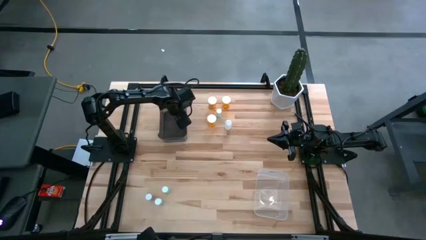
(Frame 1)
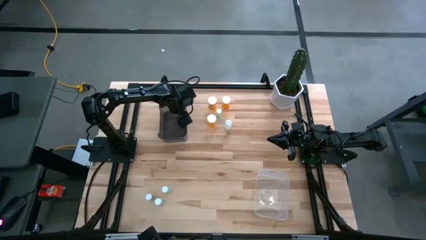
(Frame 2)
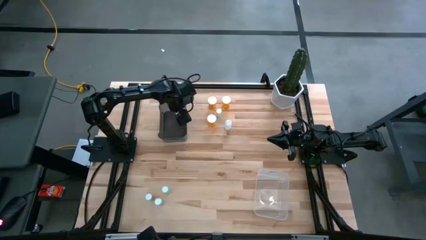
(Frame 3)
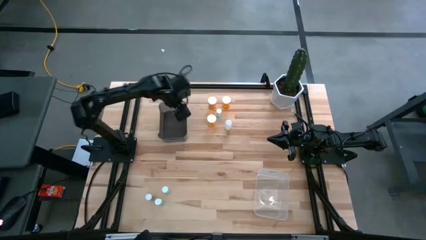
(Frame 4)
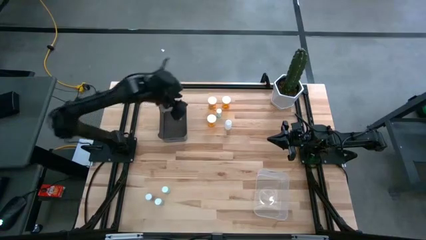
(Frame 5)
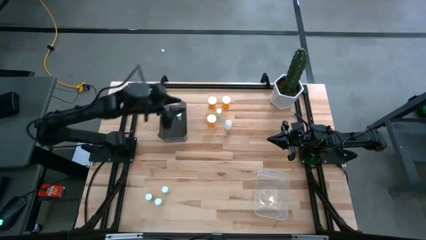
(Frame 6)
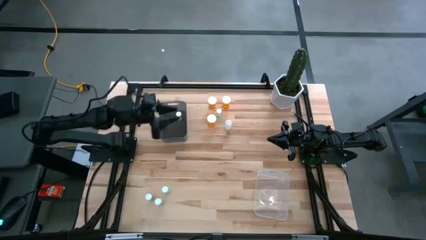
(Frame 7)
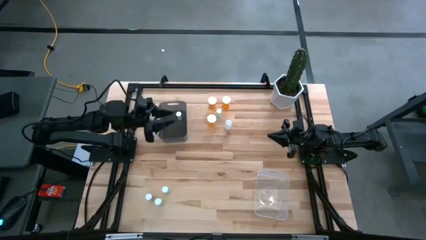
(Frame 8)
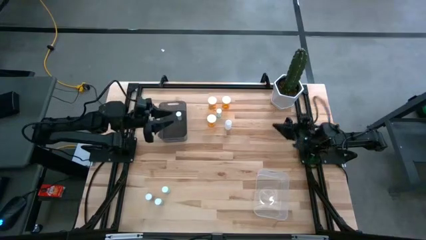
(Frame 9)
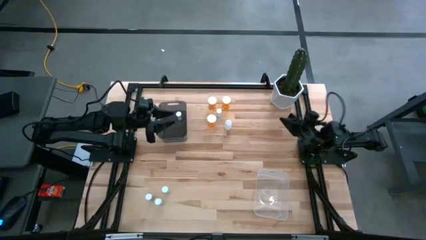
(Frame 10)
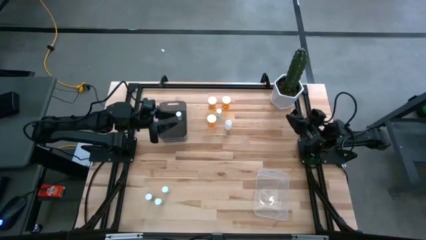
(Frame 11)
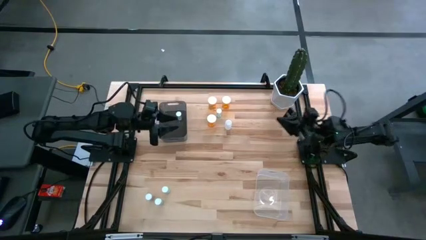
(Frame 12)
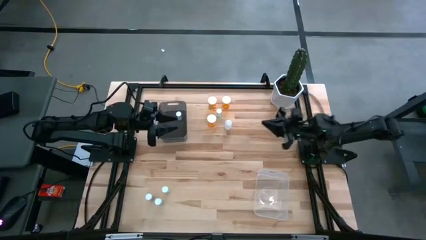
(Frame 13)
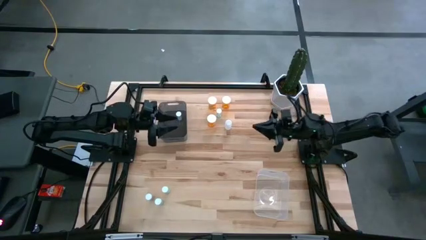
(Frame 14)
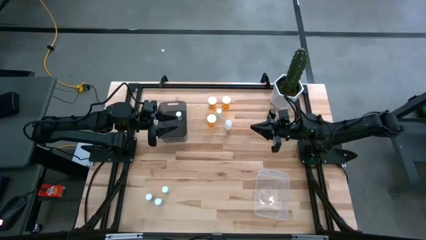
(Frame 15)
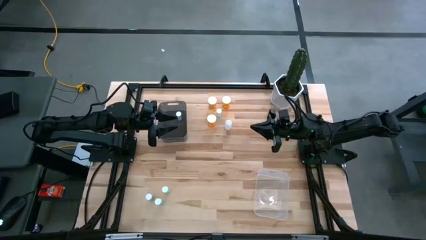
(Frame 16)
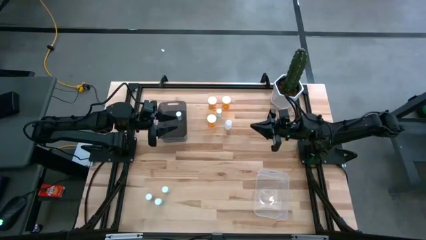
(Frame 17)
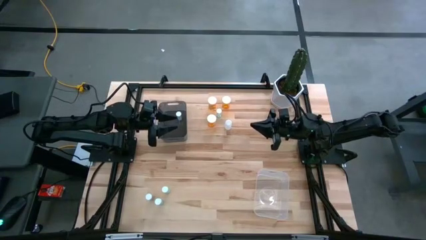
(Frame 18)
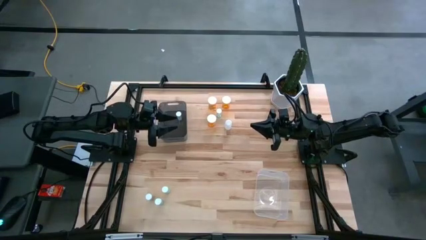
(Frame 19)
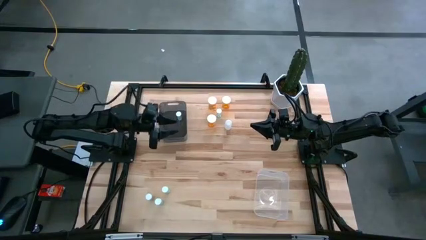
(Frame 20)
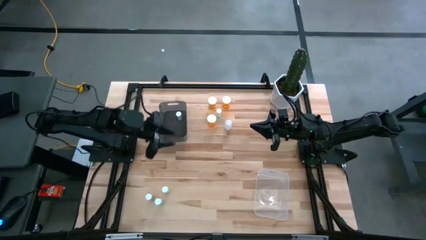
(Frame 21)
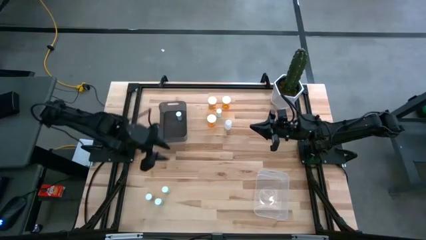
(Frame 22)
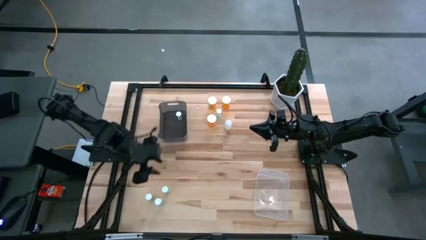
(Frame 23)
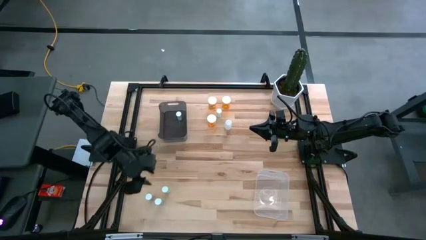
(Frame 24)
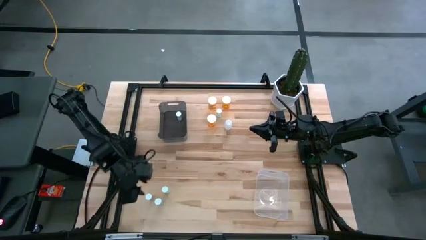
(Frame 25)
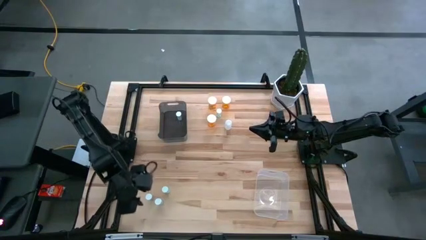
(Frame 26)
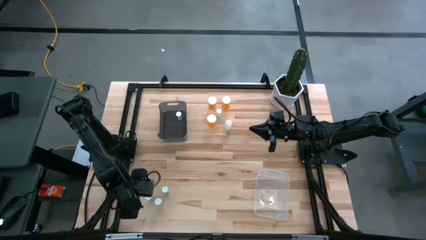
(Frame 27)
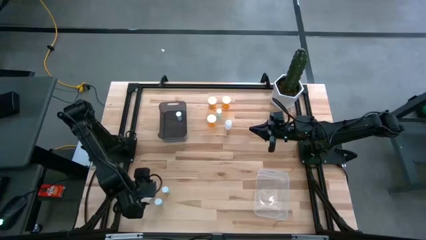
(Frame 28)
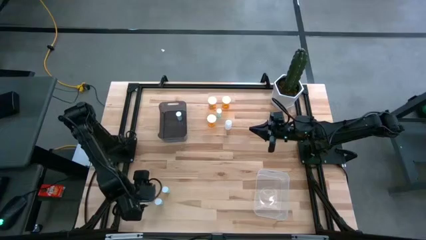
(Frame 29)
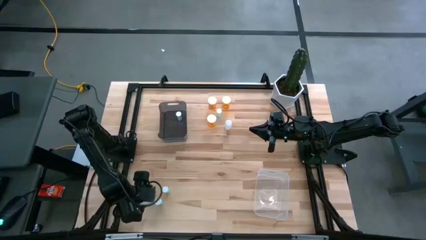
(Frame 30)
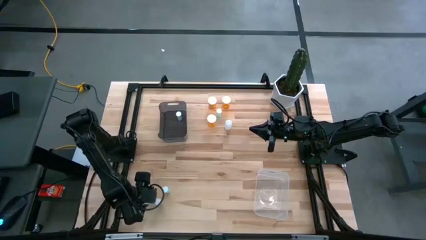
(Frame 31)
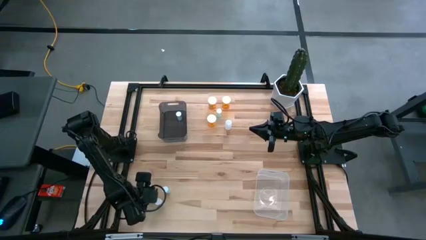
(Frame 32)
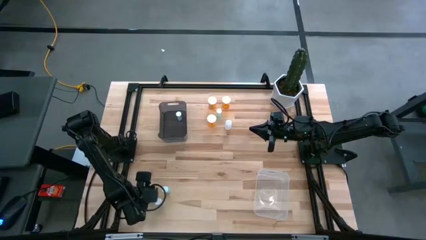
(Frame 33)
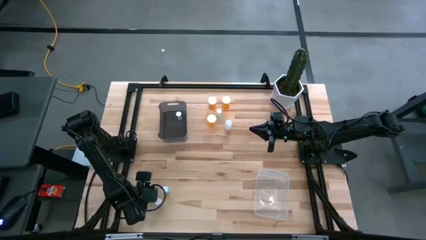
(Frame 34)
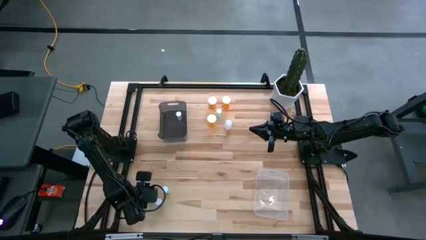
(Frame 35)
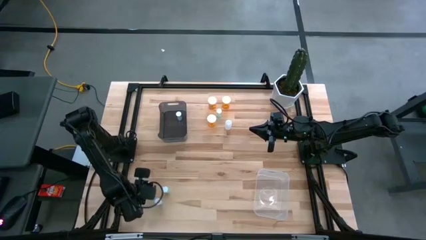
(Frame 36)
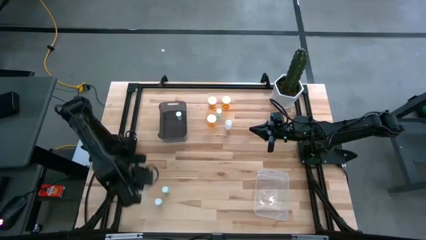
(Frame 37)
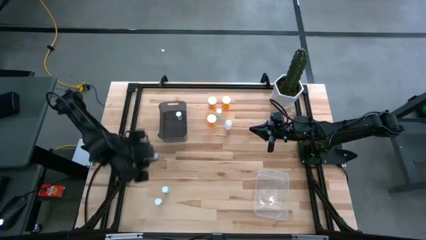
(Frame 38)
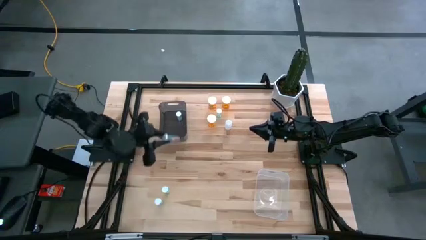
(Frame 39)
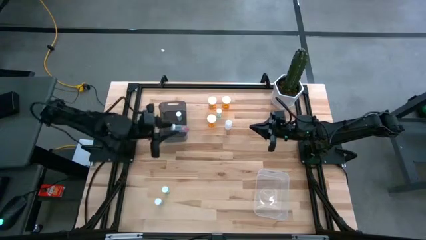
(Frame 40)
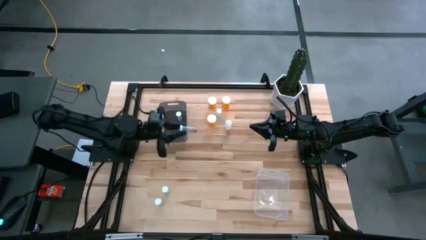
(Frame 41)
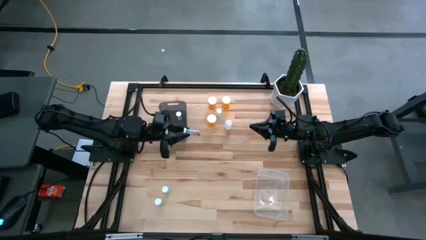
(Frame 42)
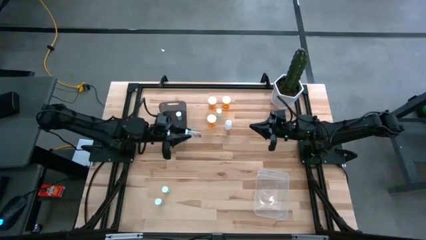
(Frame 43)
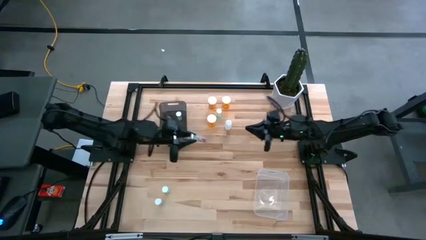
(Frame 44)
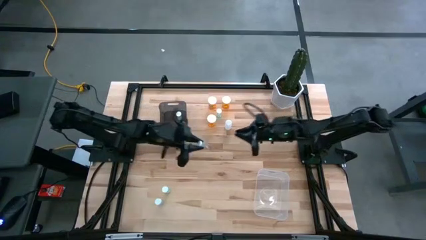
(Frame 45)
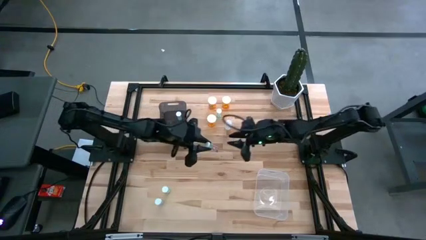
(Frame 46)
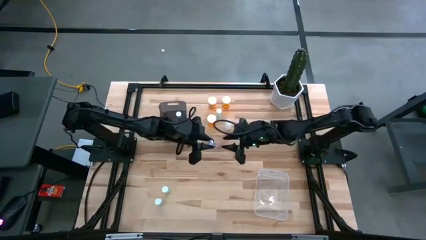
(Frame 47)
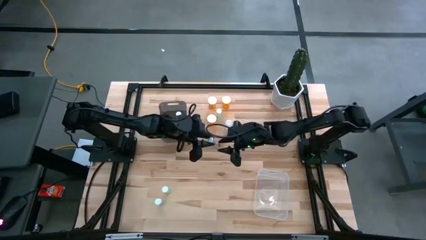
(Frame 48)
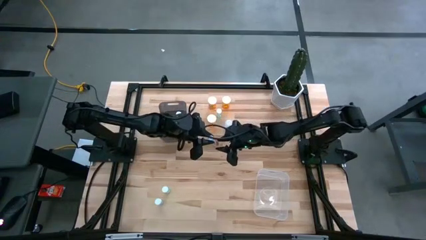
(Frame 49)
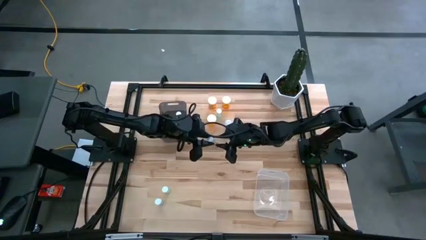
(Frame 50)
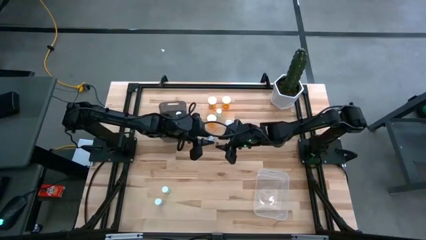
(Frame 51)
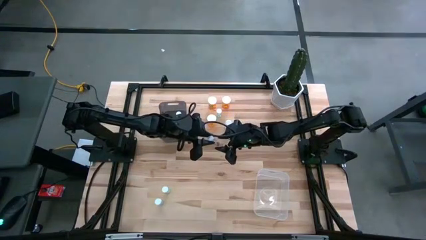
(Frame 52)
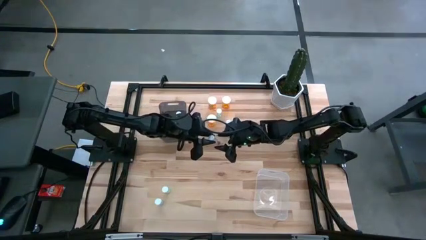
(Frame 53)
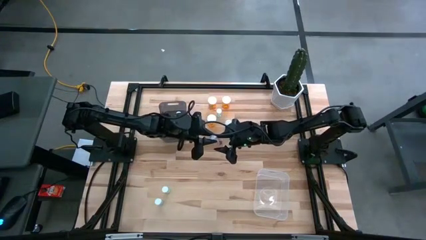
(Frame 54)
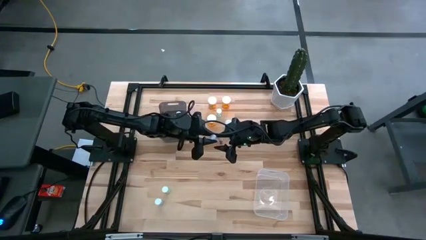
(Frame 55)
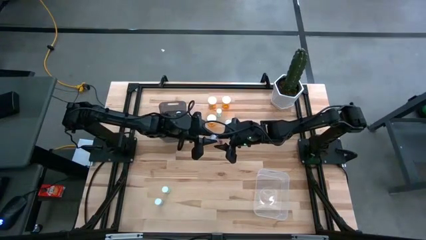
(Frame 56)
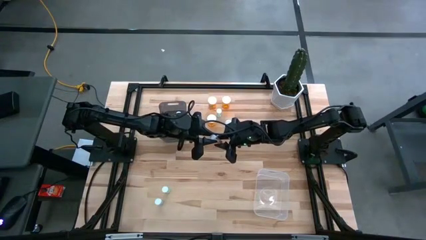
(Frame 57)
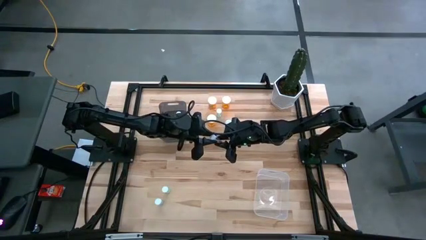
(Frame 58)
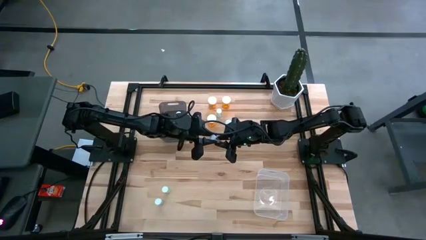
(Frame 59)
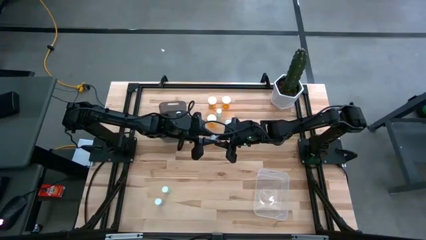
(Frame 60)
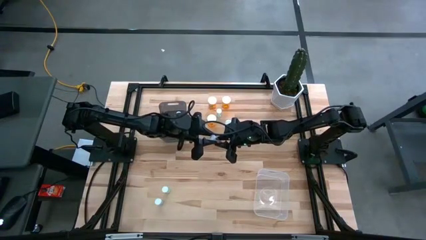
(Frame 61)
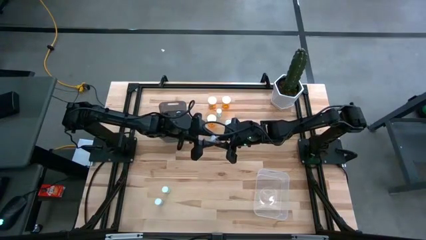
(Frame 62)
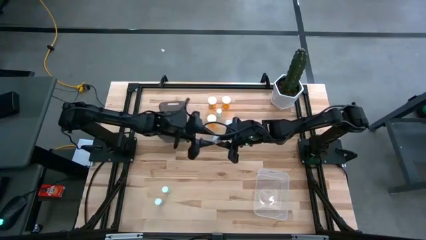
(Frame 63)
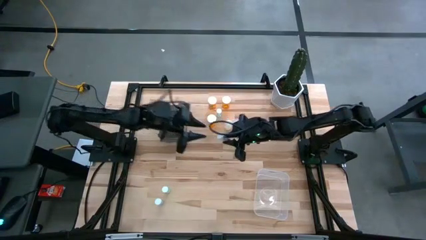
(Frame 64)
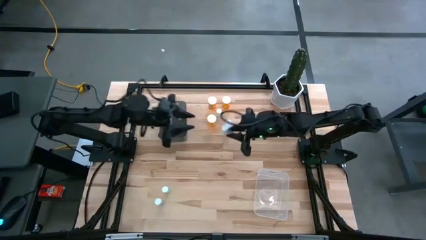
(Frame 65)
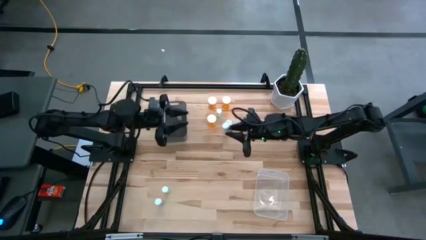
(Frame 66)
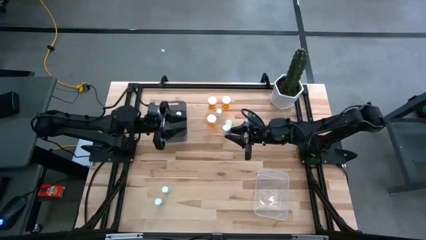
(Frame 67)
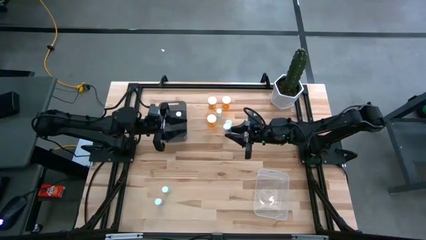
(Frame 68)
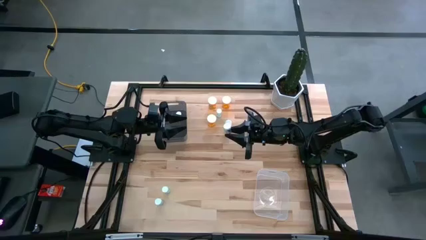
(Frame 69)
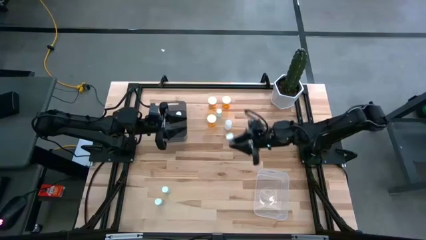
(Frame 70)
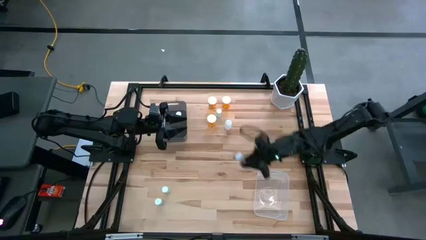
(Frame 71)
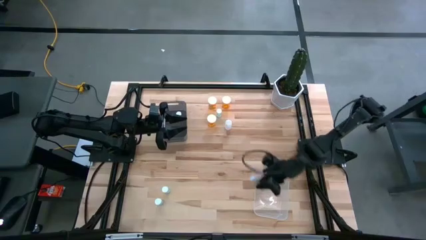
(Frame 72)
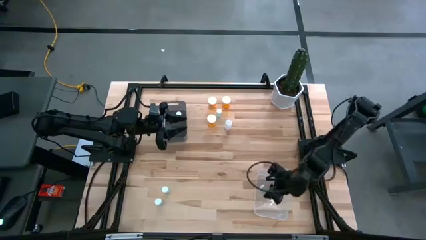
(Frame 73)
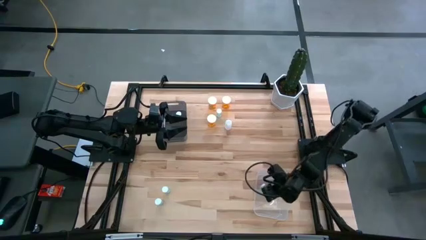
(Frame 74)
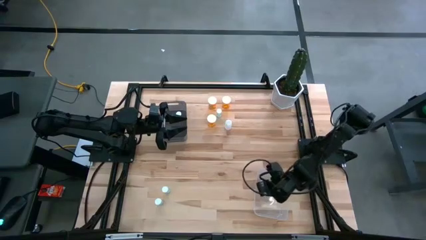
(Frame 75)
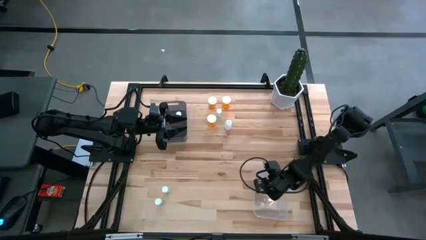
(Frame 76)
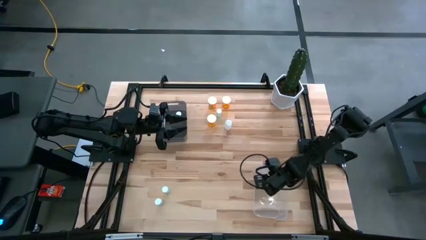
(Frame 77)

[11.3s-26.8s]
Task: Pick and place medicine bottles into bin by pill shape (circle, oval)
Put the small blue medicine bottle into the transparent bin
